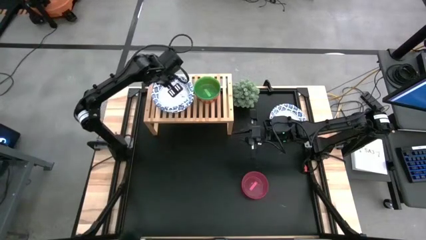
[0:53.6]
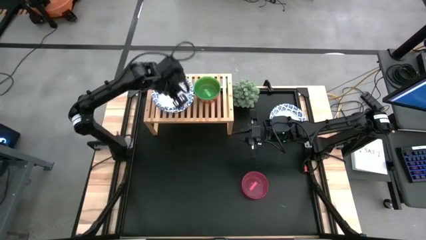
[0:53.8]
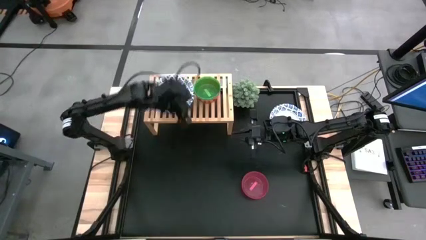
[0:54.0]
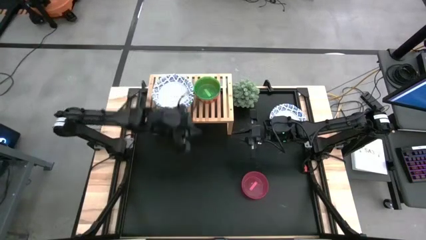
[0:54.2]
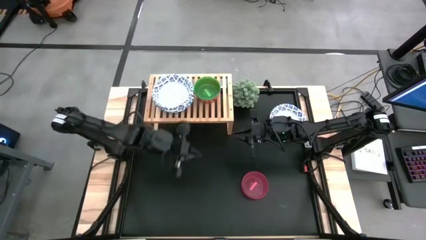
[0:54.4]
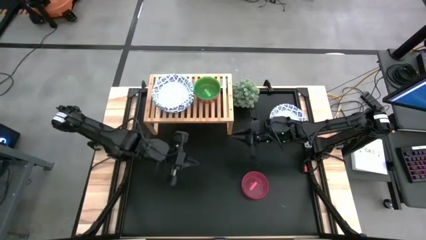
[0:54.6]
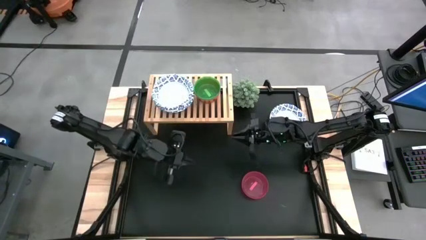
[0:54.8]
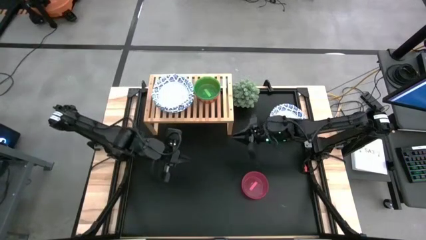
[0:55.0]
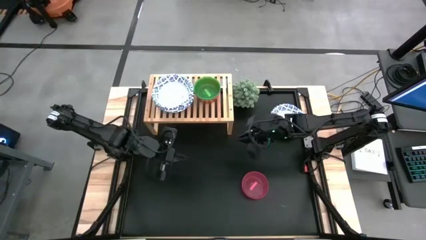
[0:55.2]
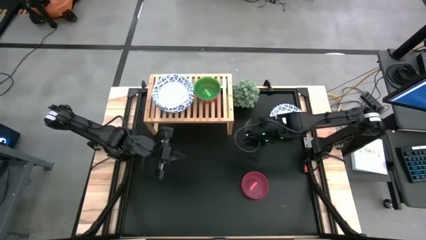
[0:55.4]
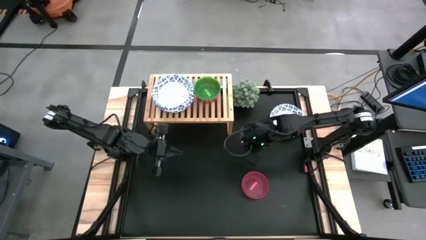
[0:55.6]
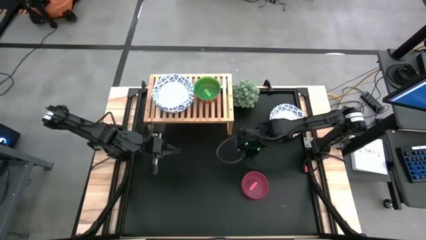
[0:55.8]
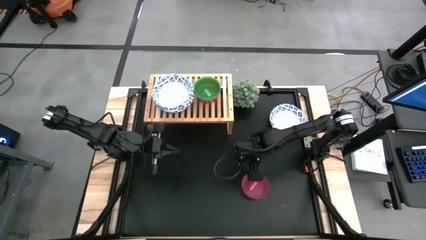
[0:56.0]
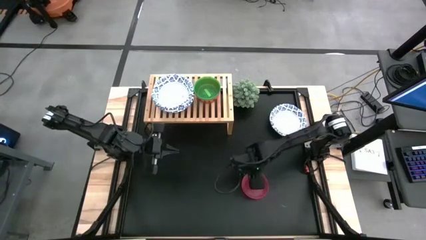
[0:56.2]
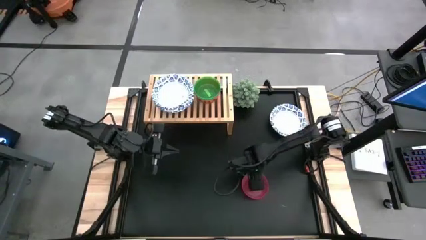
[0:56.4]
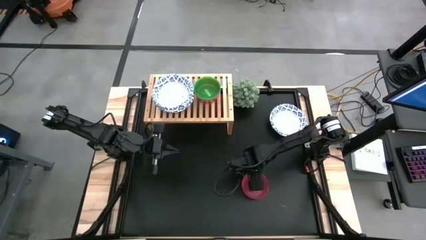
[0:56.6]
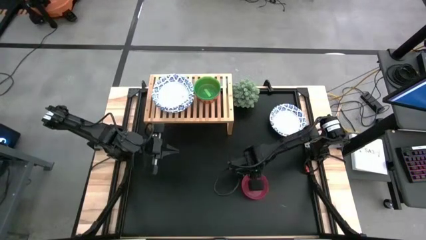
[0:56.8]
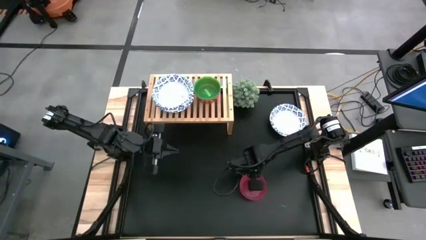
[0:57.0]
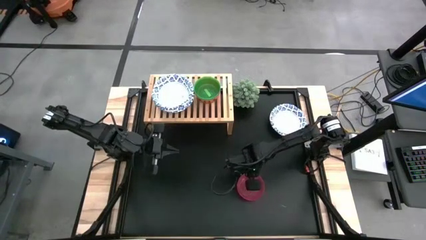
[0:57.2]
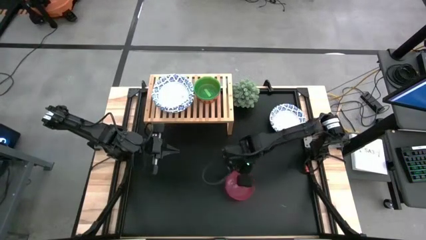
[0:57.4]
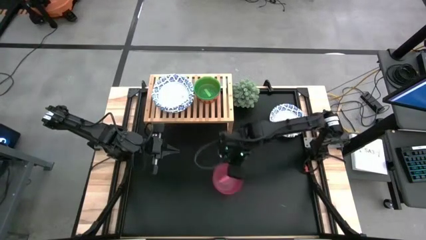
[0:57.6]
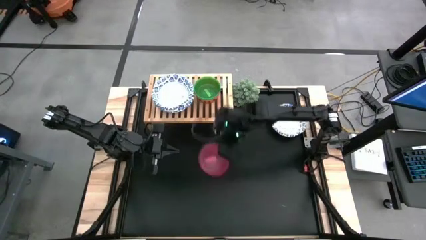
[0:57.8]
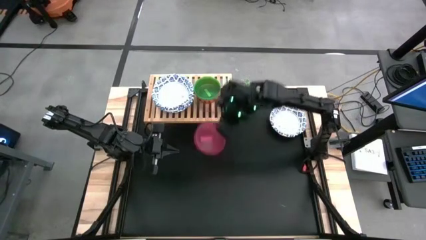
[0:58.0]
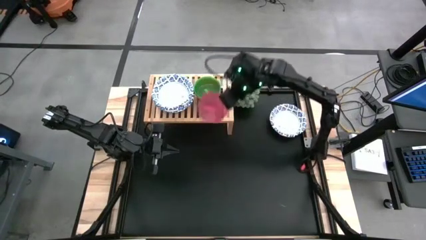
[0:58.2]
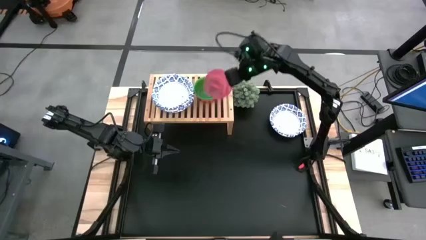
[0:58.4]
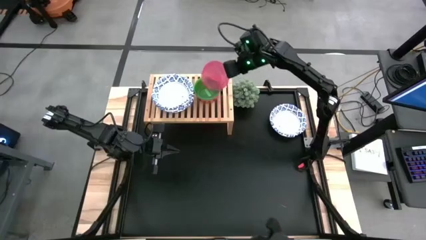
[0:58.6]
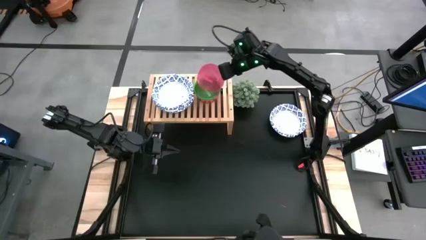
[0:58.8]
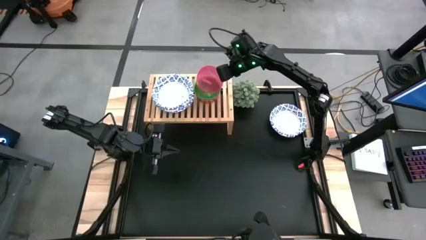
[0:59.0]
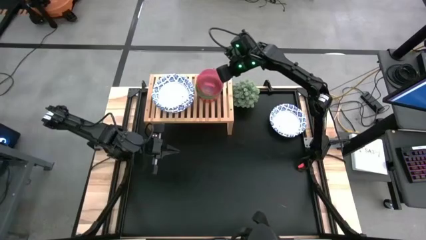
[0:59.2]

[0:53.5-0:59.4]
Task: Place and stack bowls onto a shelf
Stack the red bowl on top of the green bowl on the shelf

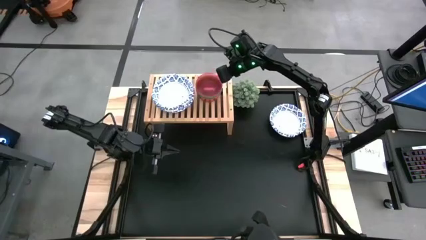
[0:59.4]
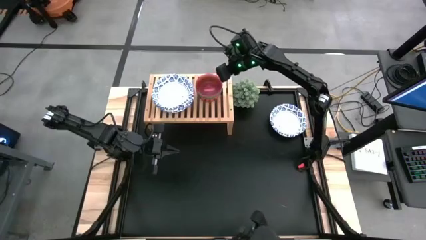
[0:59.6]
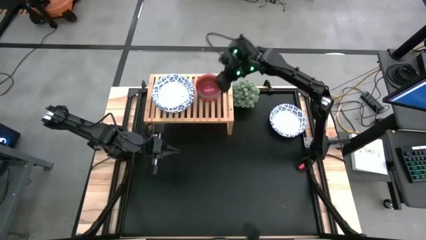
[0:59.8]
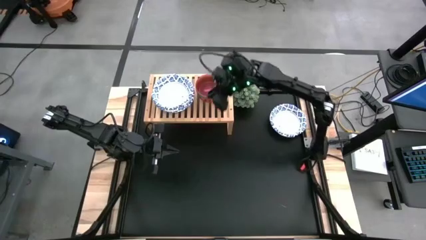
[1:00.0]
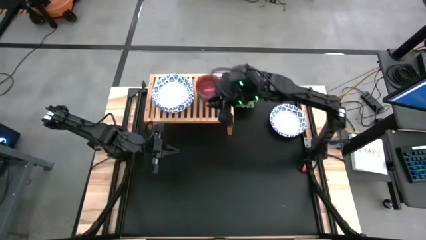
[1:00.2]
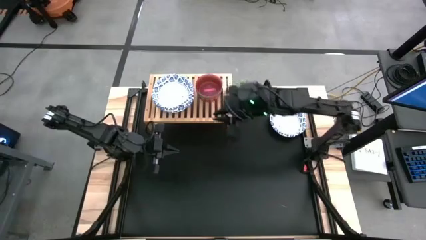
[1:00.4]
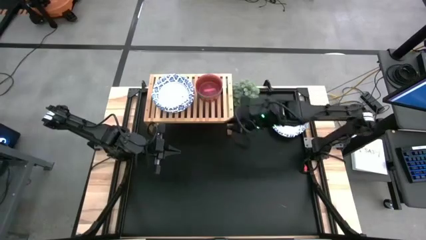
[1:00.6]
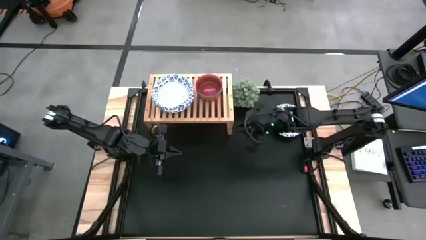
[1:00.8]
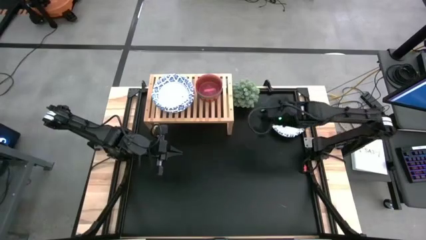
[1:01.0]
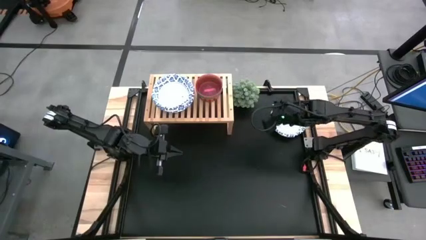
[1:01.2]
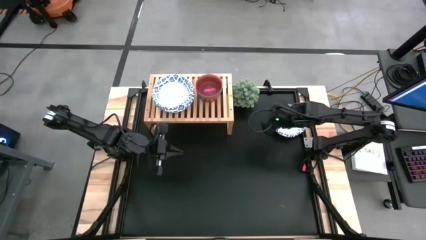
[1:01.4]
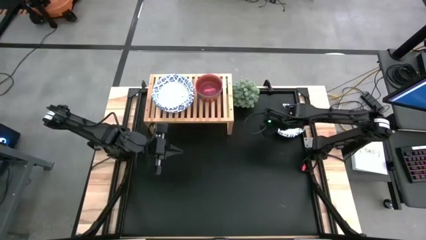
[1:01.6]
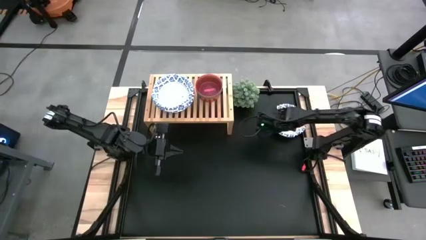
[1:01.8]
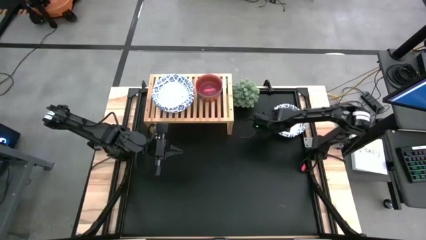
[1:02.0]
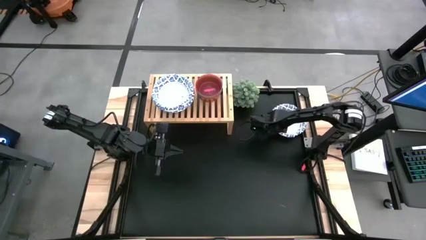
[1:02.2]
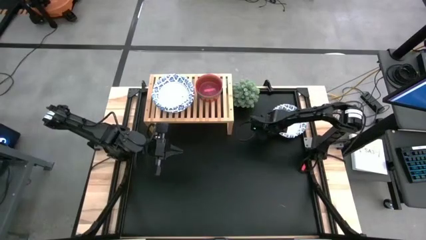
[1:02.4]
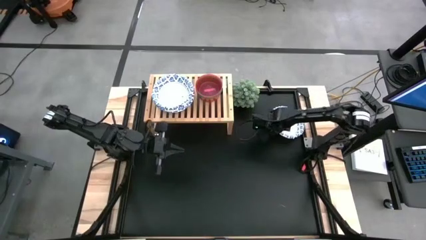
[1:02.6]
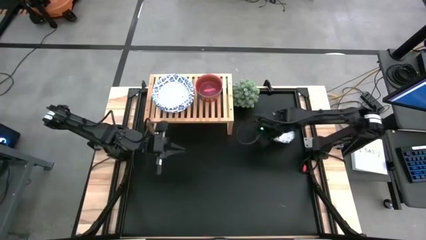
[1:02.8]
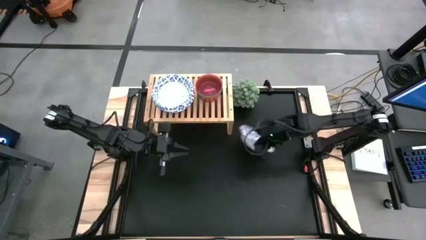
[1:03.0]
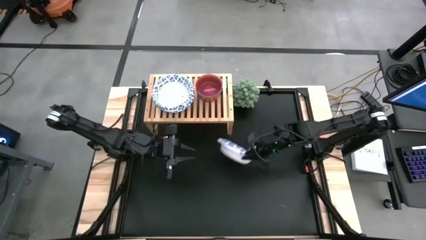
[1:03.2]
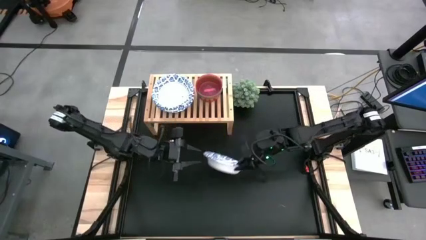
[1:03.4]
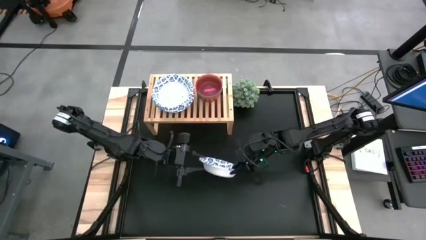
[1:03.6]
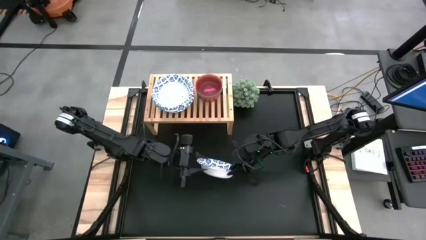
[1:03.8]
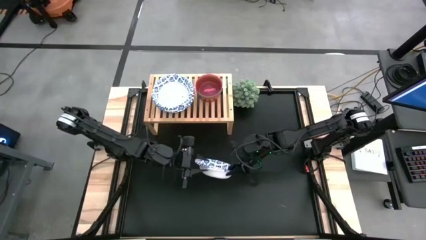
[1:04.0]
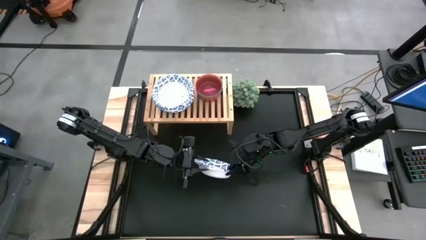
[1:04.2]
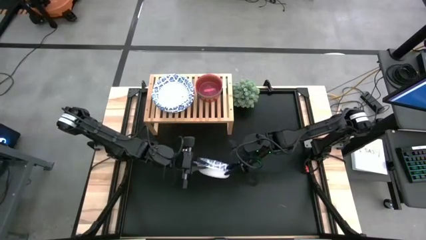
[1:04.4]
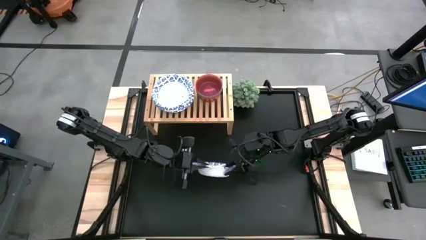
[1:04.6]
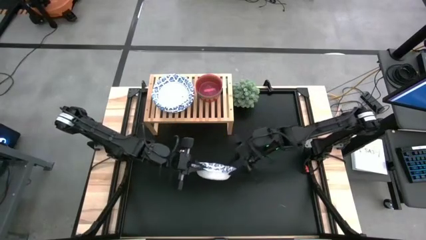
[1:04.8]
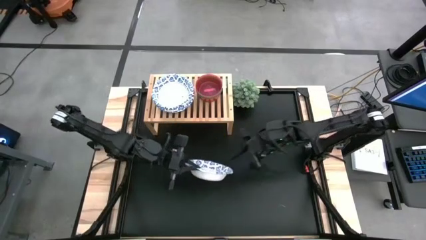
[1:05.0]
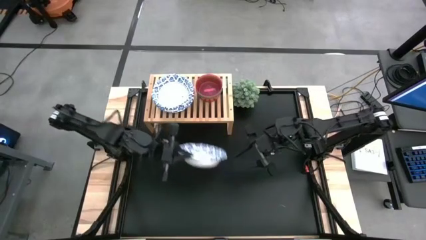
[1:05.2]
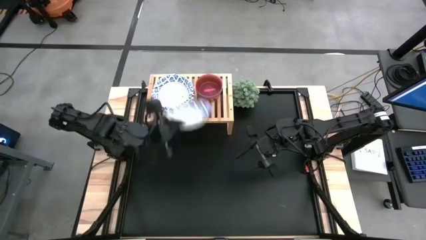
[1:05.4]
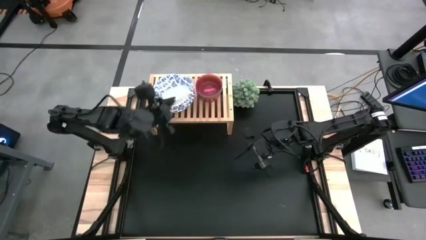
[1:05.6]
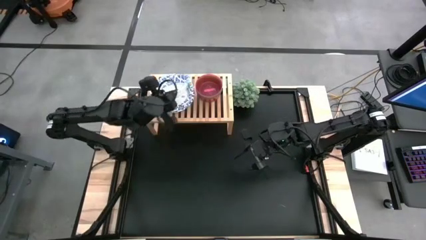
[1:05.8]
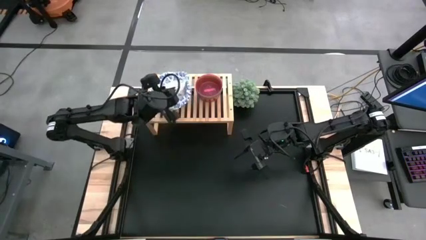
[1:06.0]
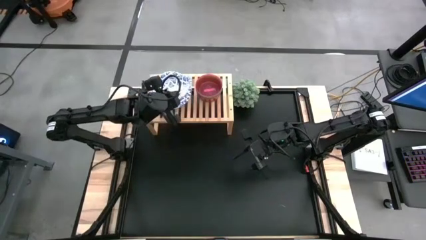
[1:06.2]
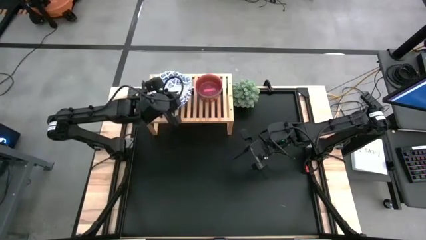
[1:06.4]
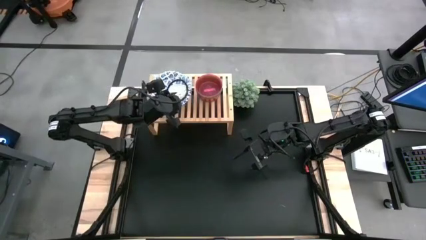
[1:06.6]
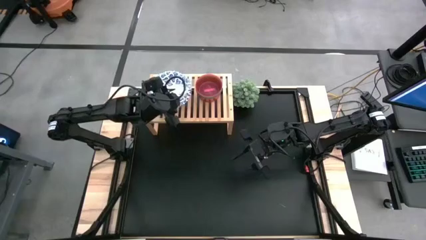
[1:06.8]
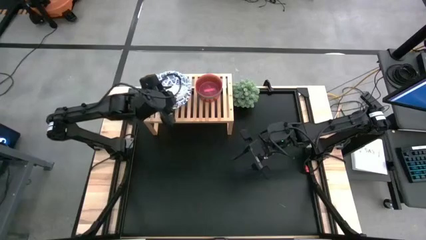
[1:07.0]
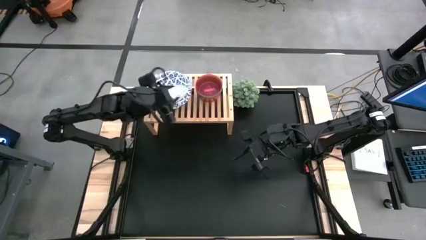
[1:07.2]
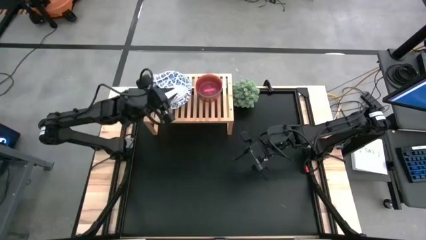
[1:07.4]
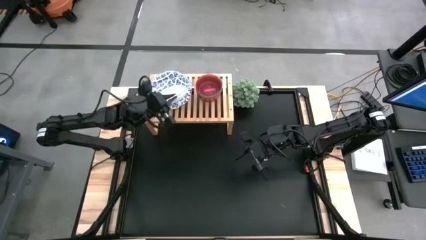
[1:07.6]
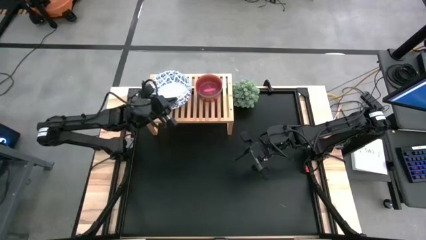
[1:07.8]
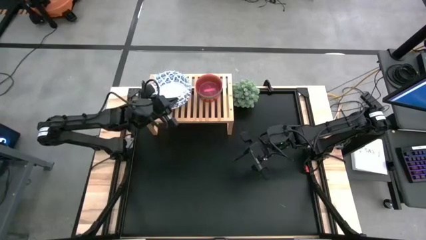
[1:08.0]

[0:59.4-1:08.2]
Stack the white patterned bowl on top of the white patterned bowls on the shelf
